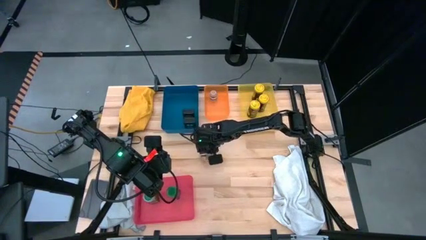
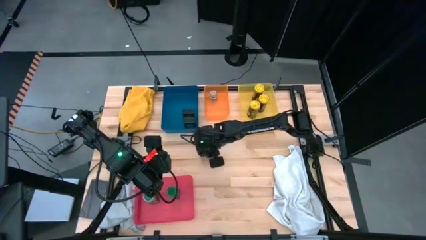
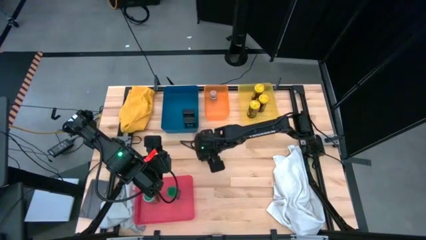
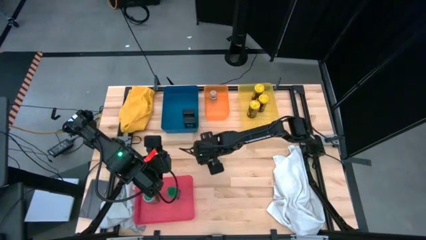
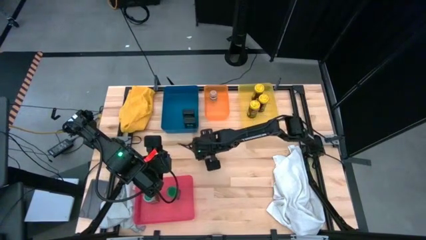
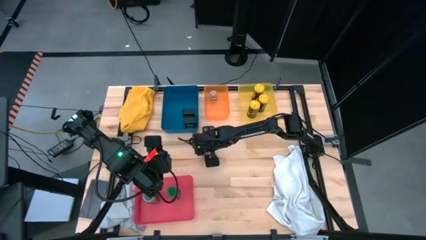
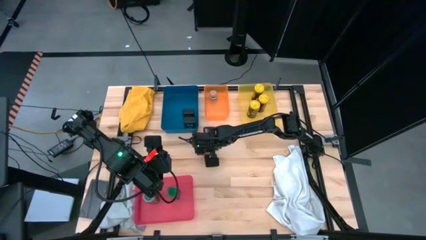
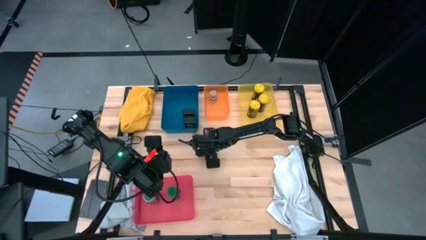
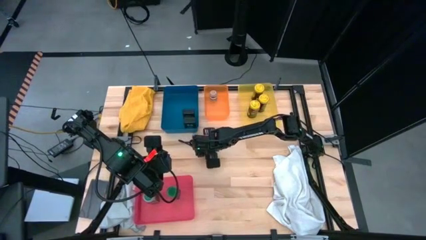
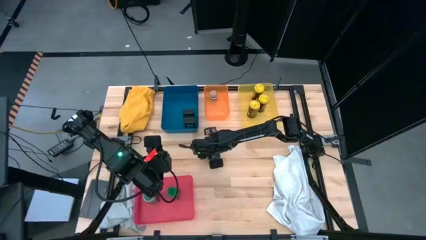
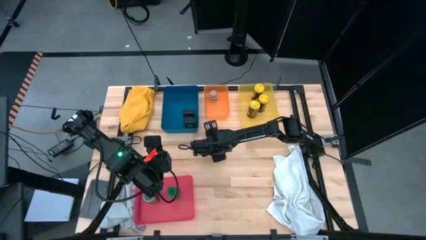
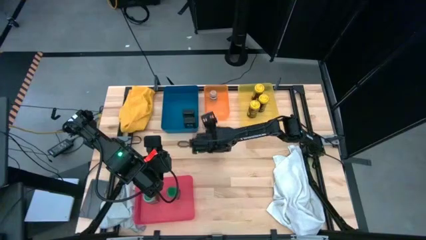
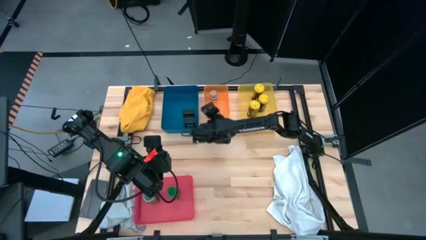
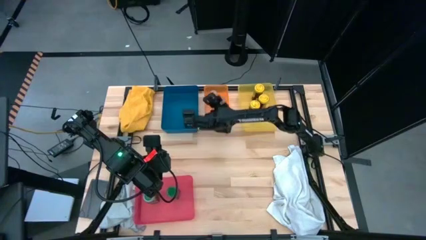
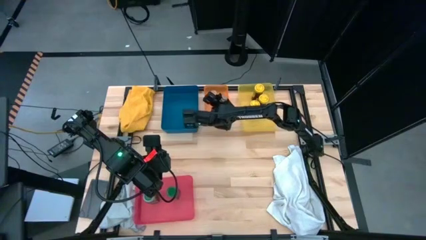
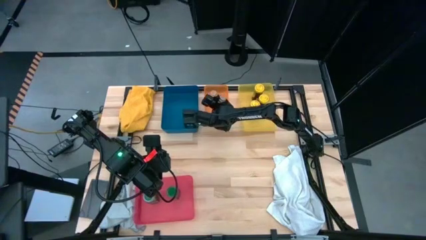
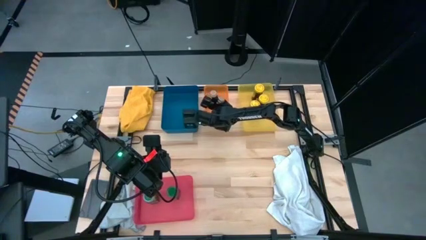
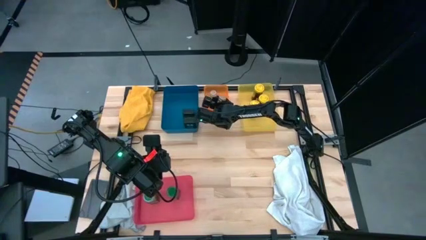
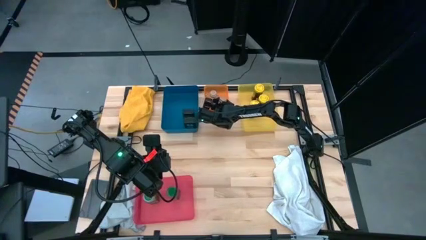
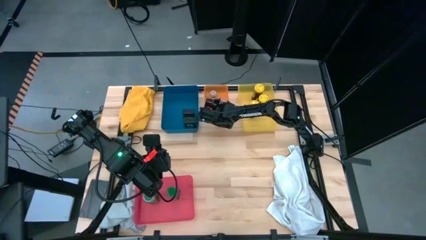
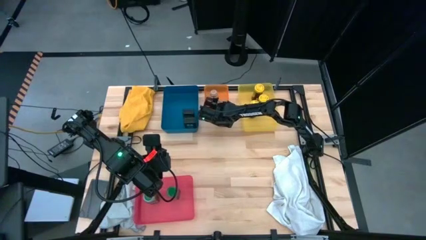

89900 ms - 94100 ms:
Task: Sort spices by type
Put the brown seasoning bottle into the orange bin

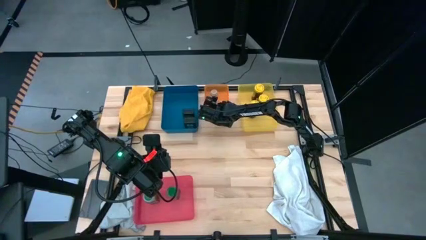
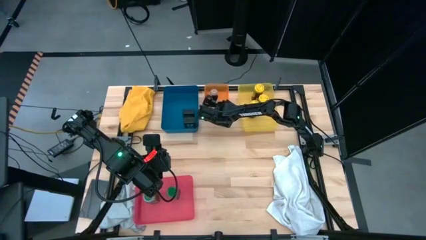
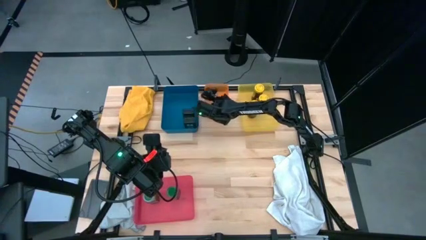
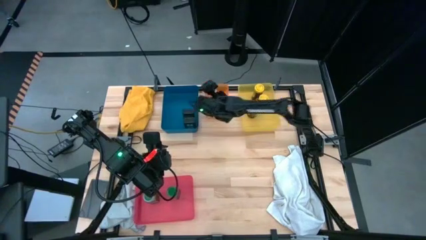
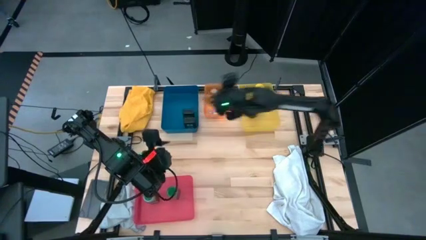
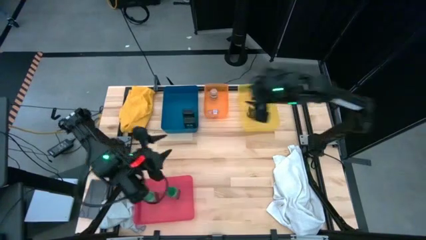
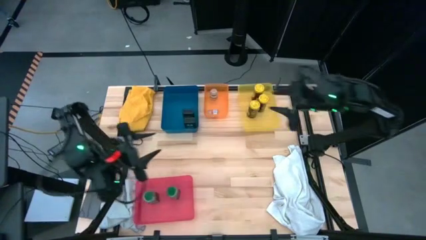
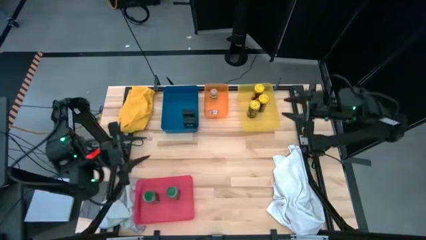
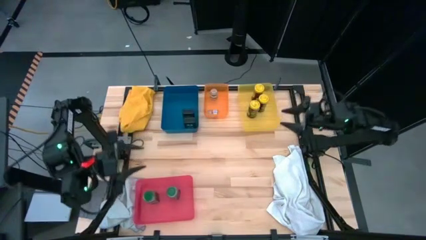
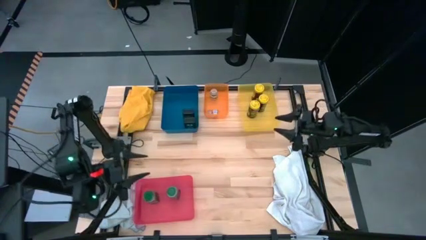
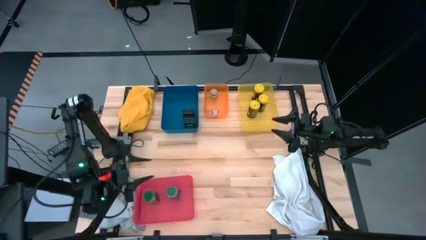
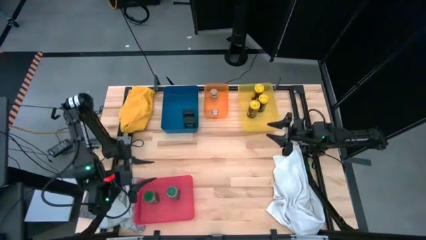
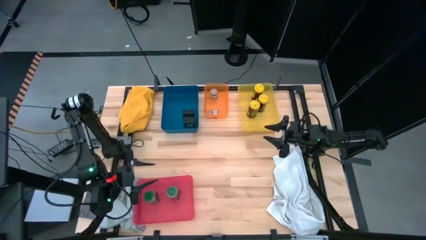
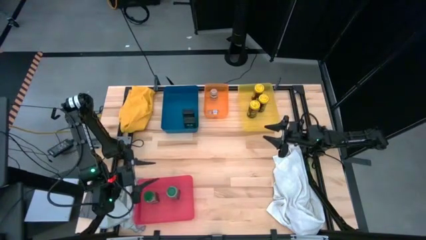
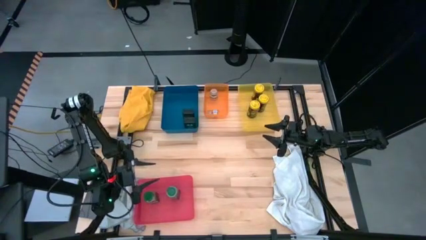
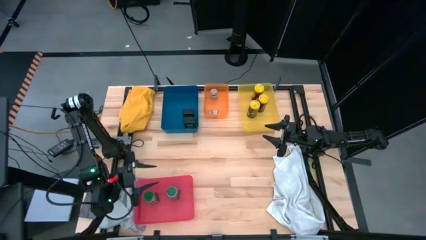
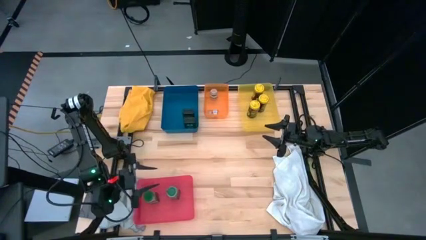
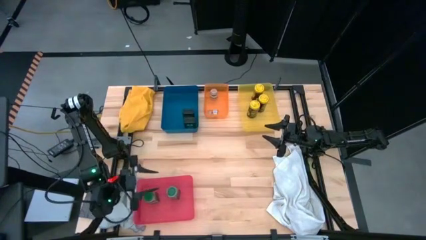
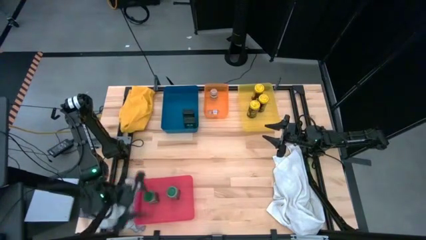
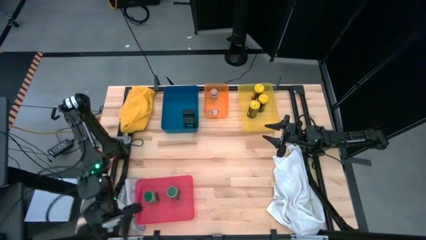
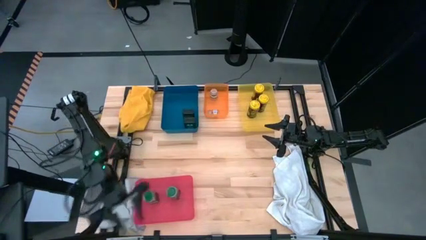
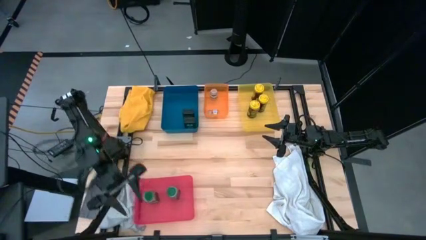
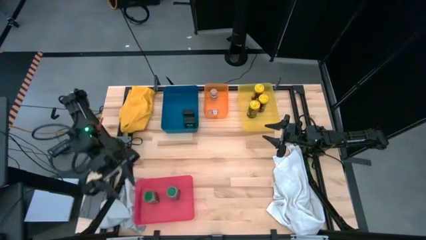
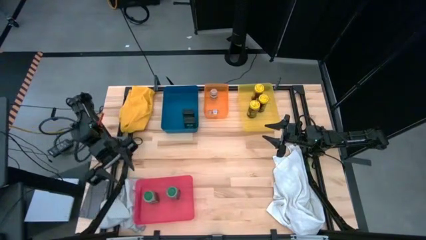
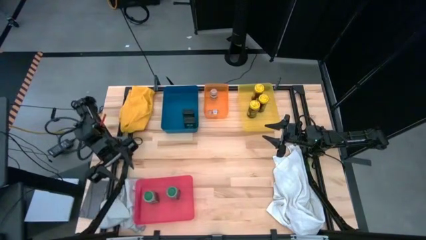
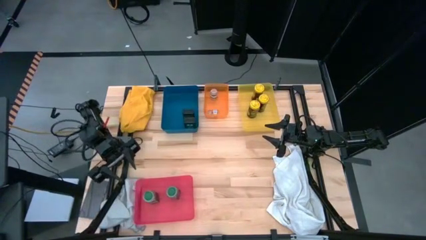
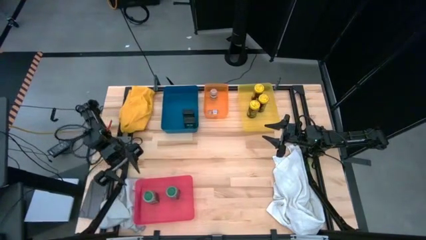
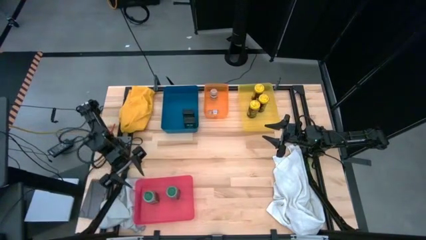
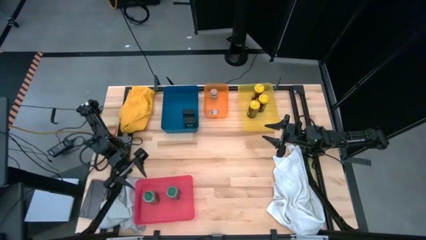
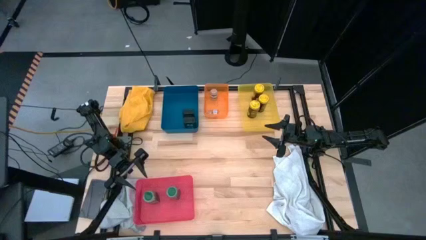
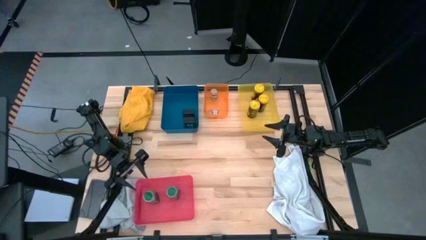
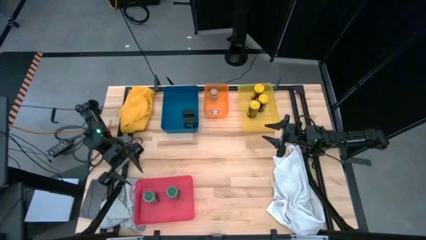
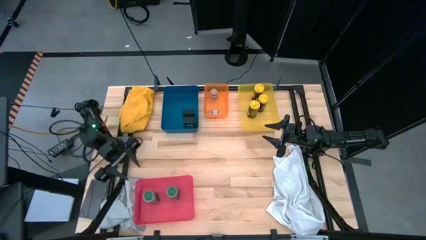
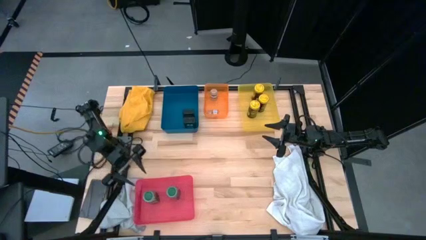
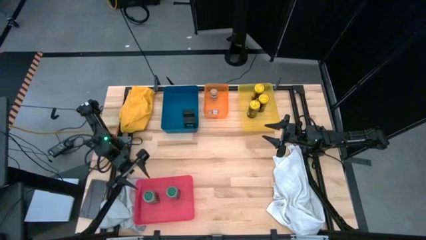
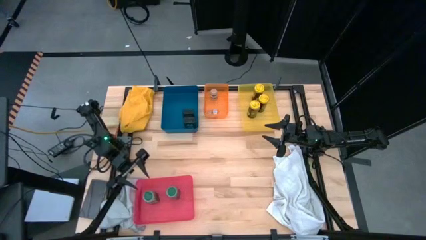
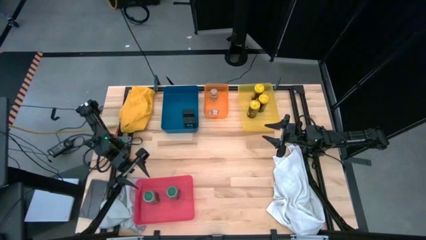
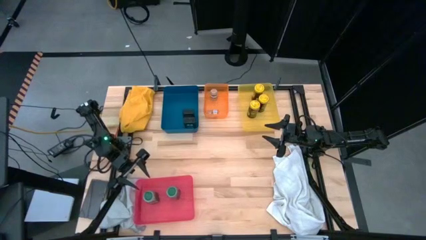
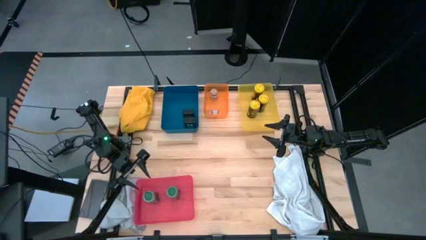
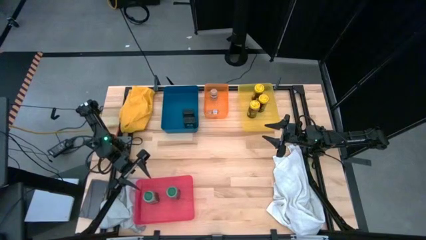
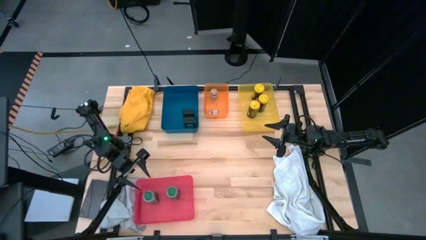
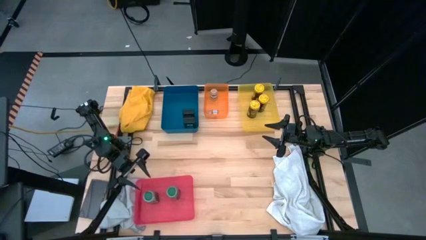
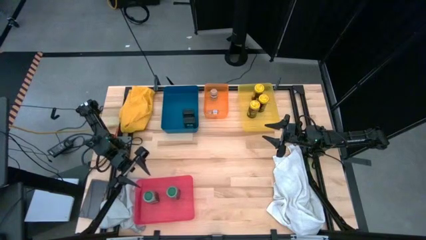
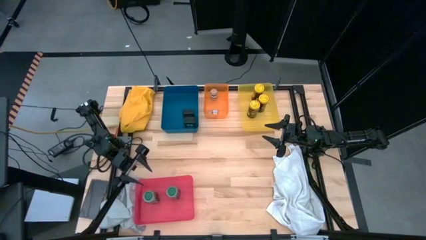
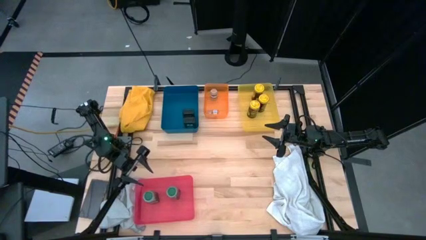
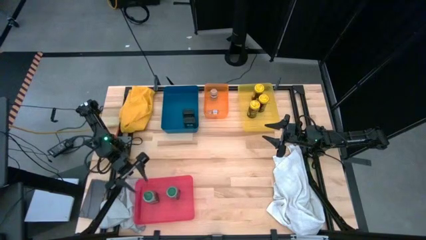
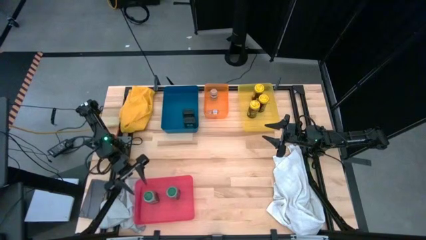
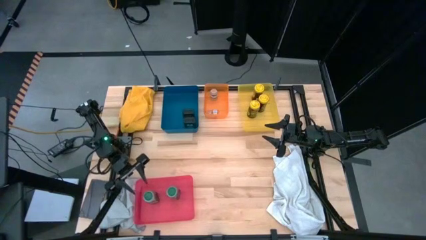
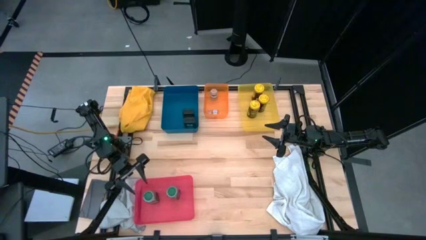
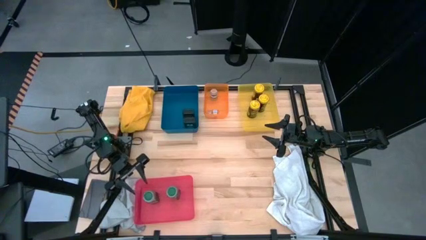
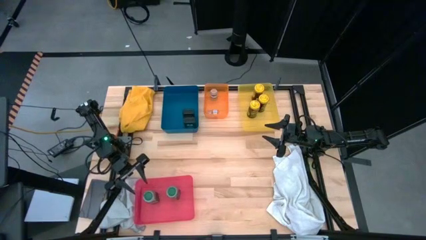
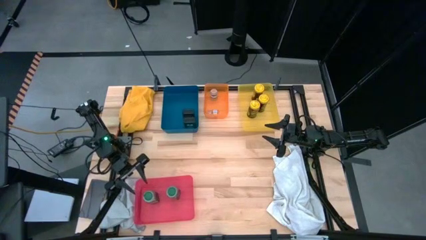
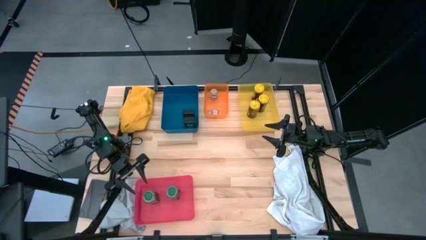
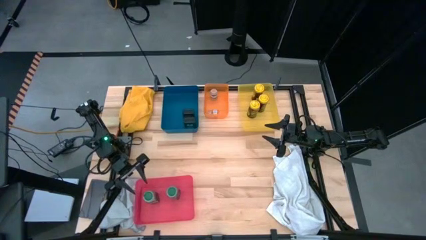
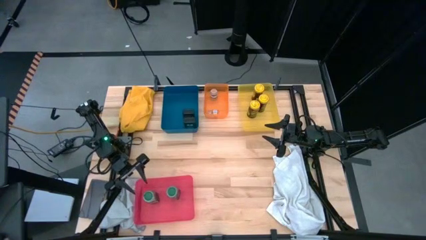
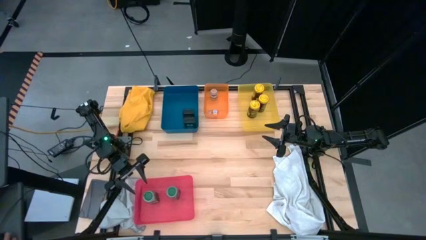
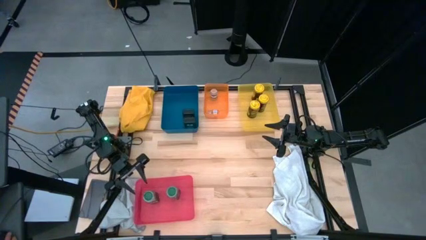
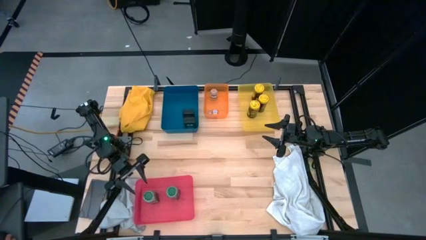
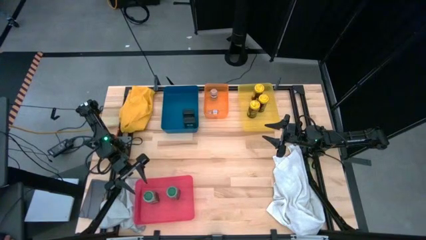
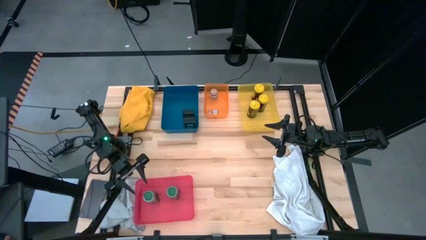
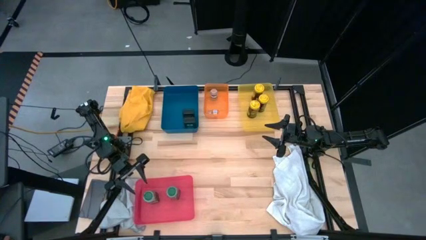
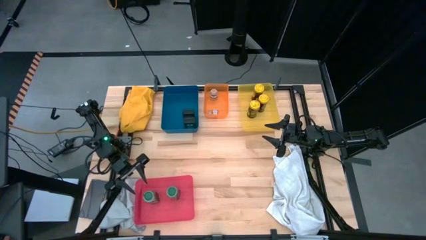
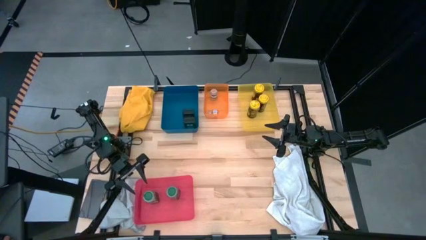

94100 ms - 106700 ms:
Return to Home Position
